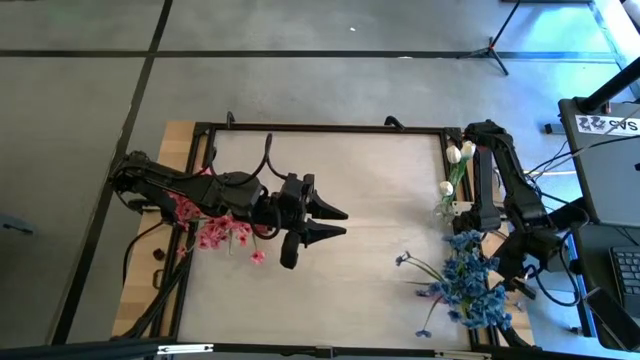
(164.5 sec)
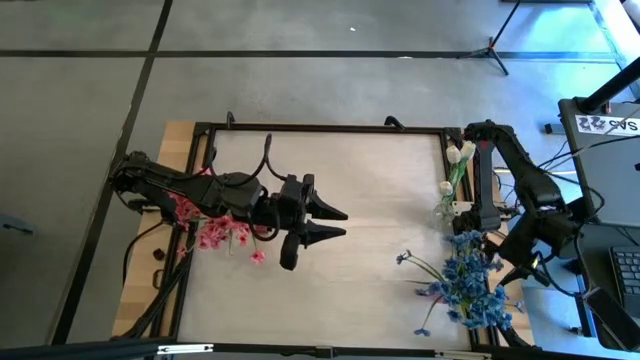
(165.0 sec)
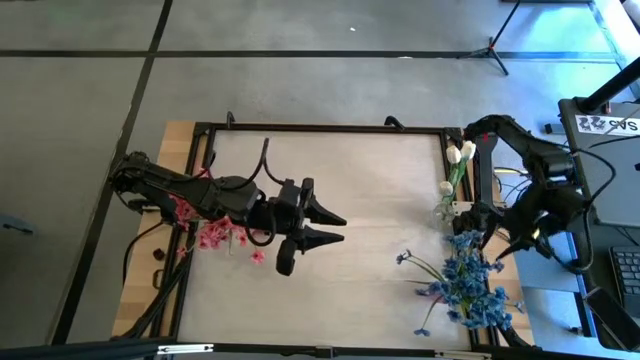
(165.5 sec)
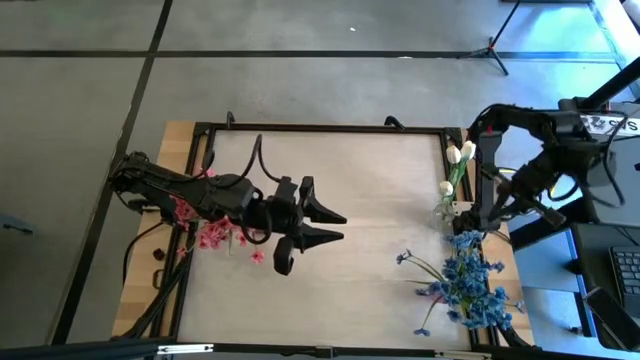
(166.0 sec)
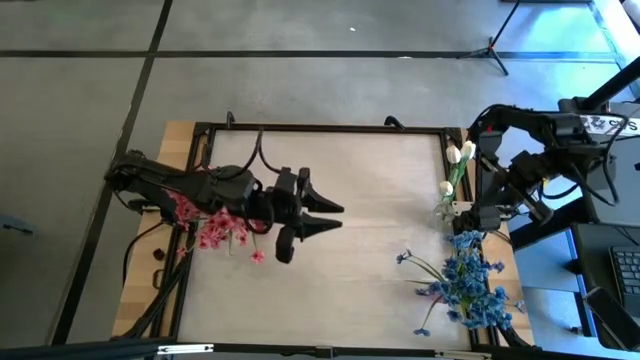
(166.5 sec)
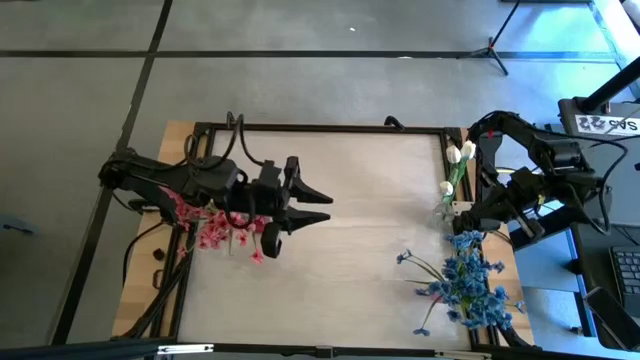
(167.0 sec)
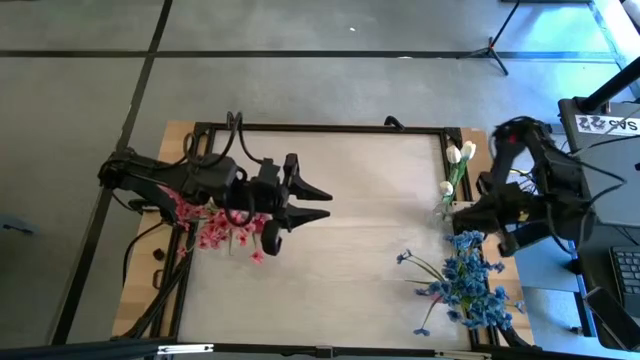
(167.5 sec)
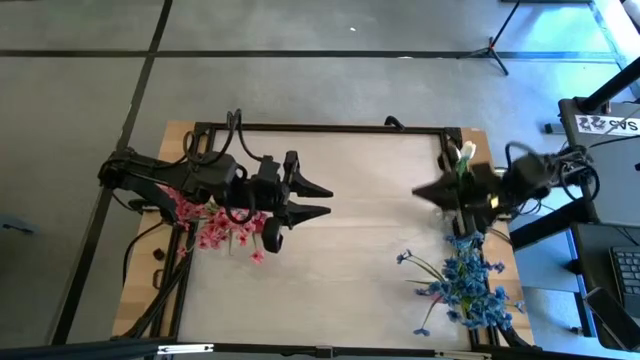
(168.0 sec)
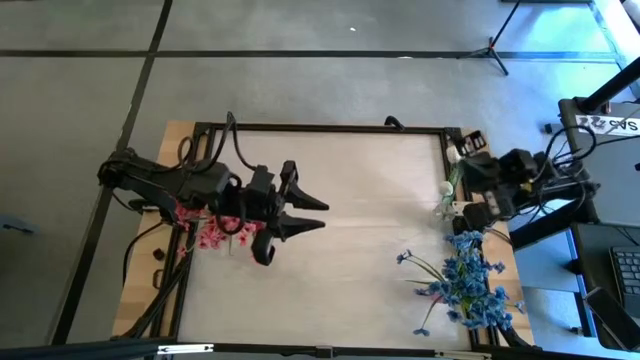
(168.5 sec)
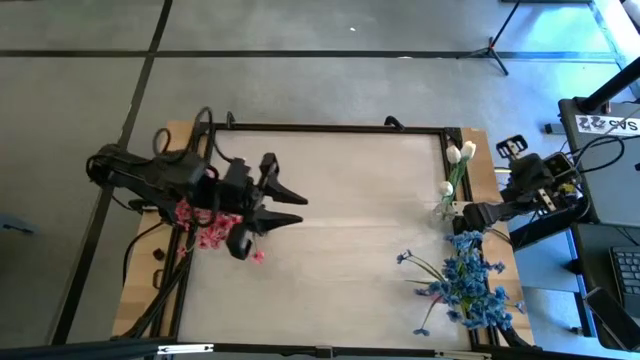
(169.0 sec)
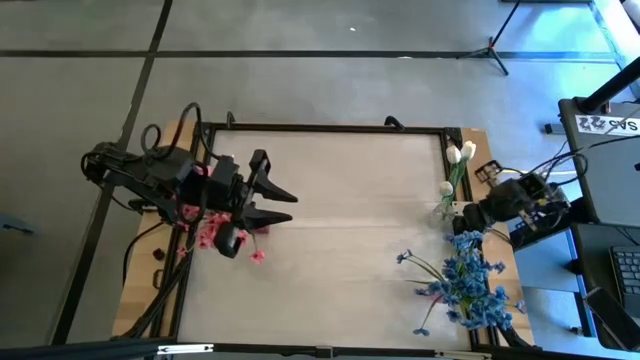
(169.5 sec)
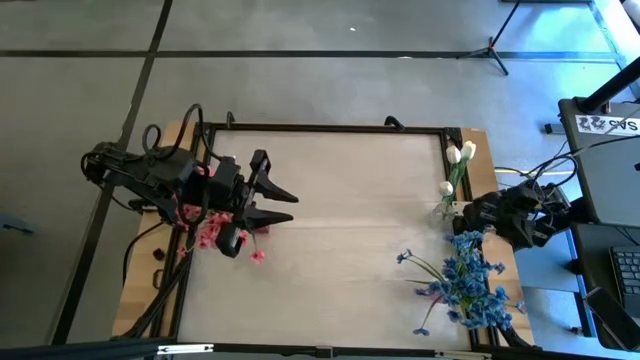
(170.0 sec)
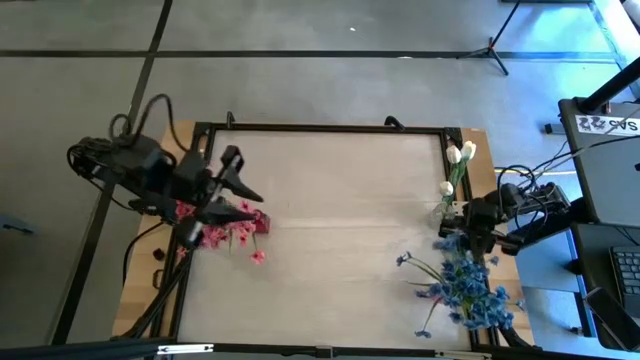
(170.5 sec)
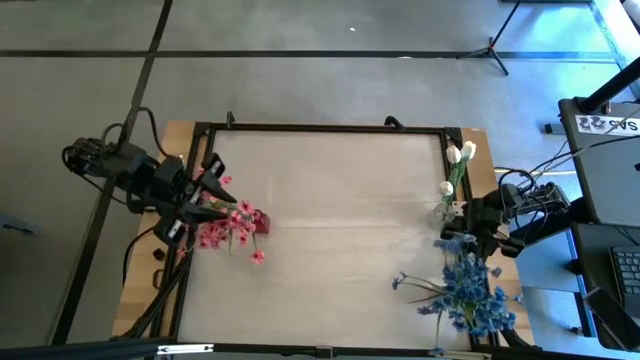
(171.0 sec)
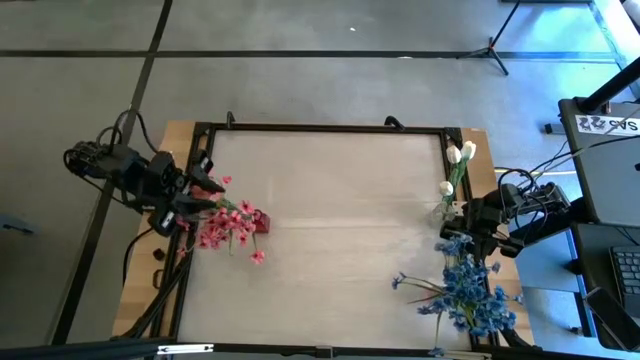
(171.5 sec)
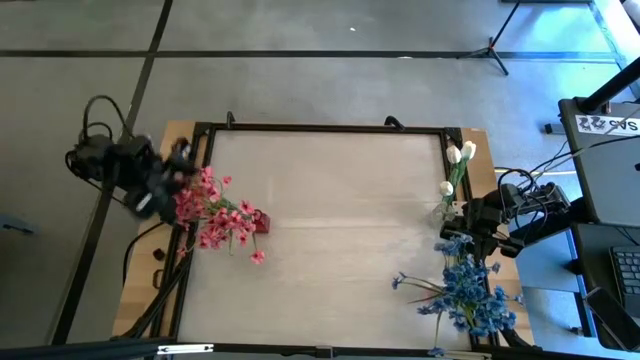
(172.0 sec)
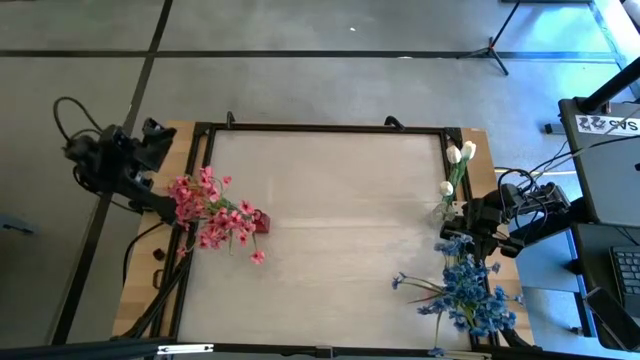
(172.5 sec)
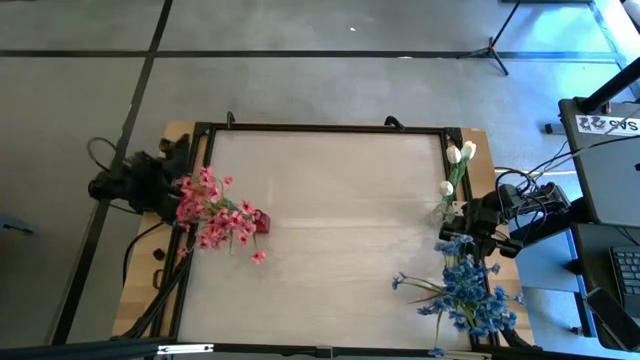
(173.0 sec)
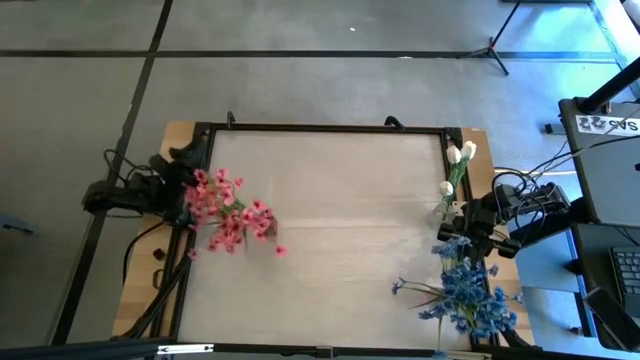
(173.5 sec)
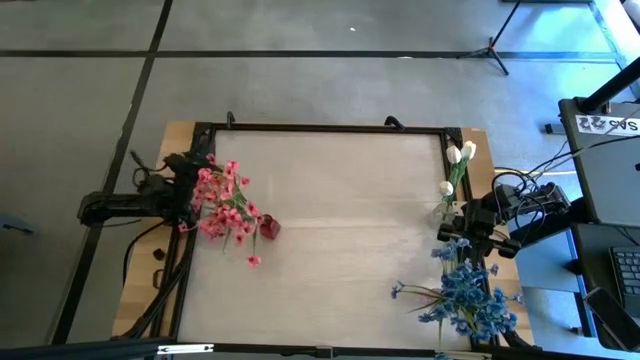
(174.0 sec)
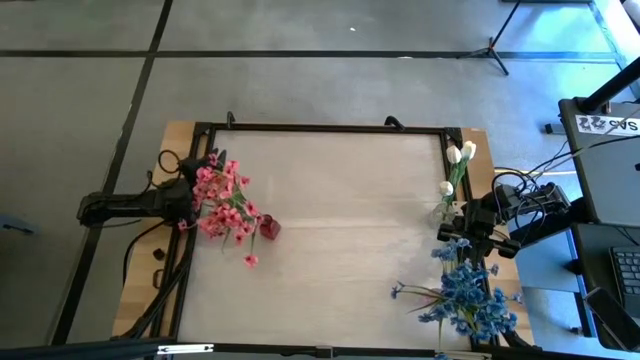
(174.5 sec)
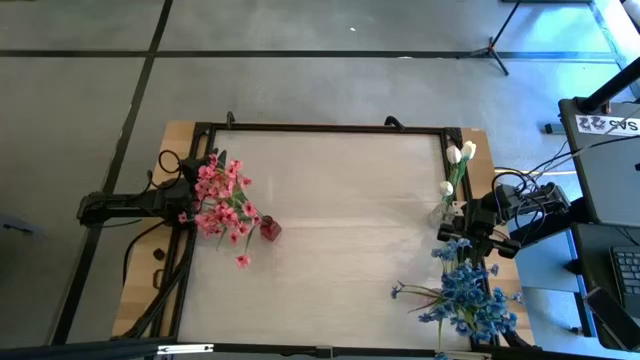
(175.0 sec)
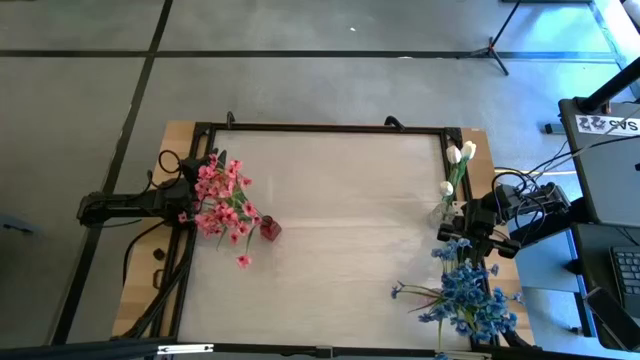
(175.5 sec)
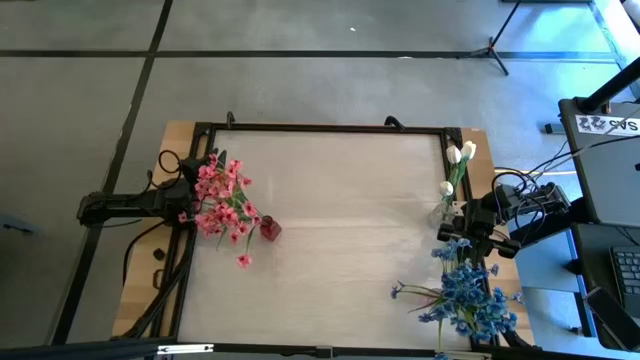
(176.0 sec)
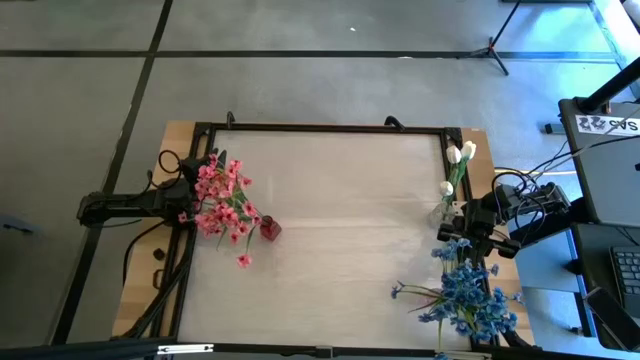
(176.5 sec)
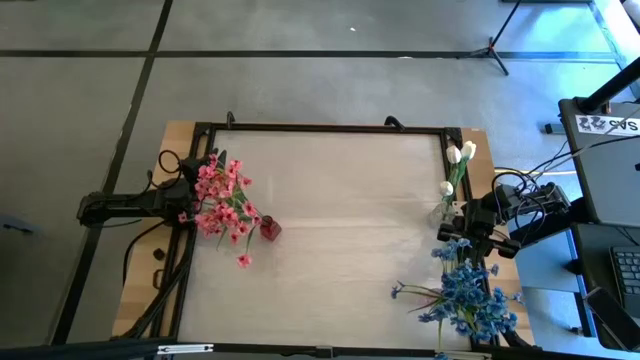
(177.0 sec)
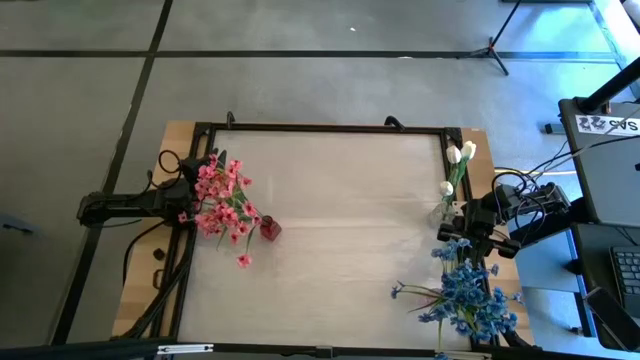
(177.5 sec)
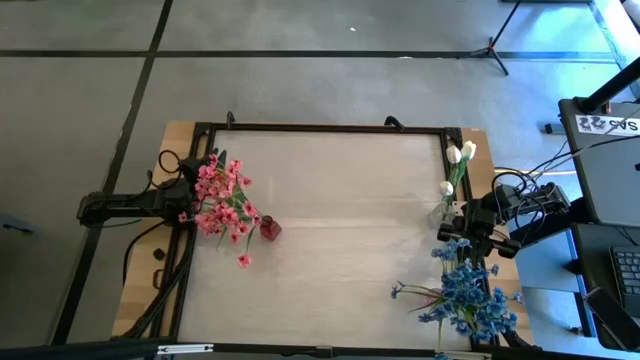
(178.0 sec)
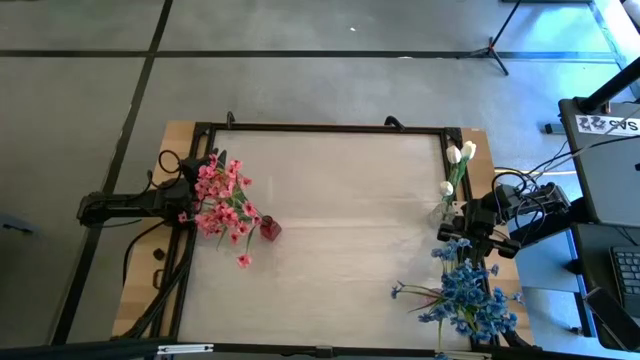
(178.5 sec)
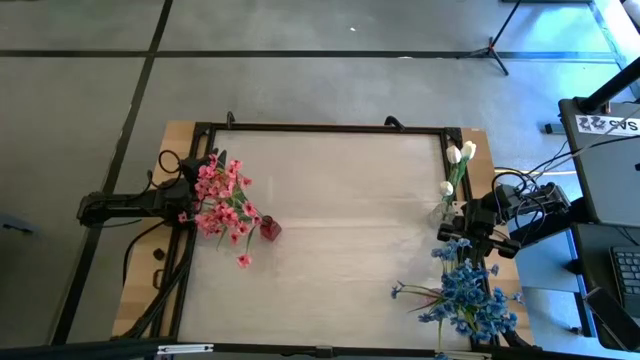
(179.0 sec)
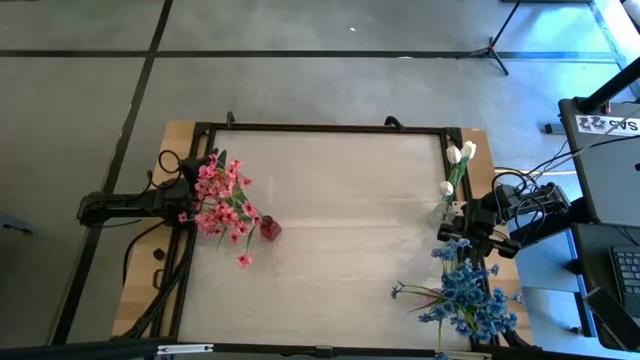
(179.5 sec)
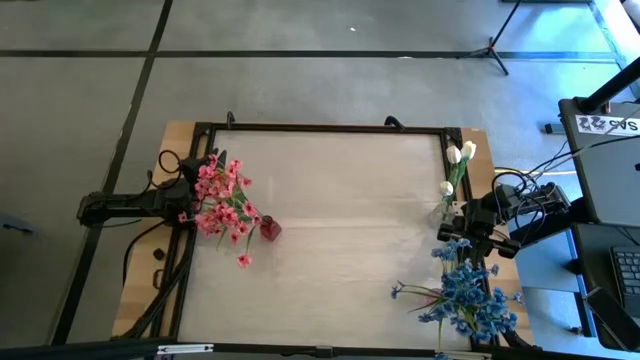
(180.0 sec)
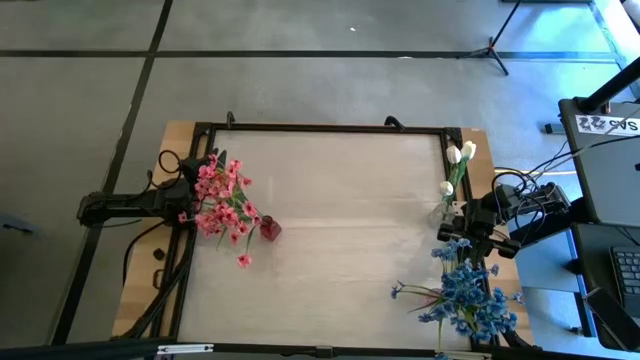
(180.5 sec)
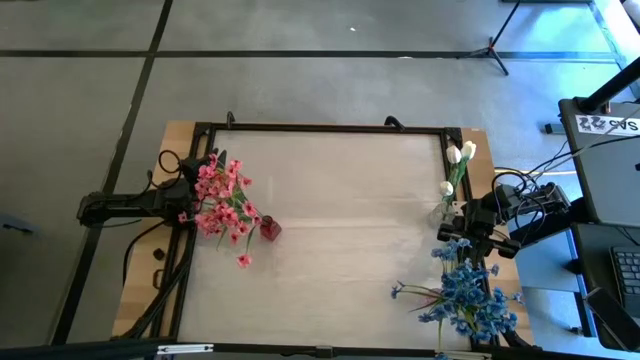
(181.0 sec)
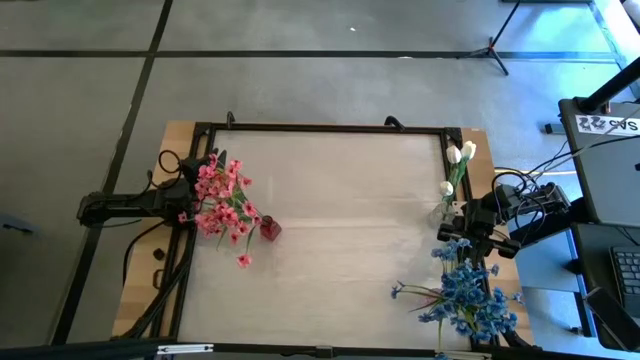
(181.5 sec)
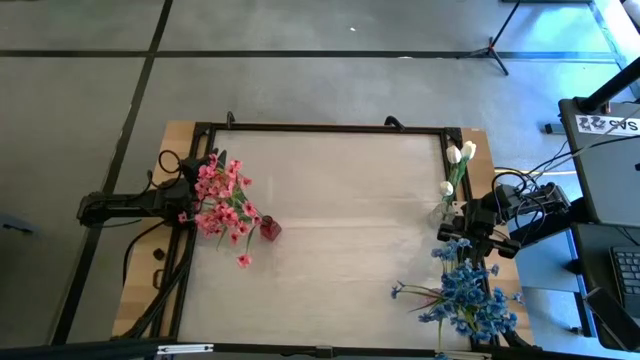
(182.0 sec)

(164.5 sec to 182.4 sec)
Task: Sort flowers into vase by color
Return to Home Position
